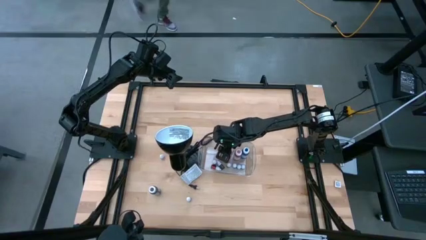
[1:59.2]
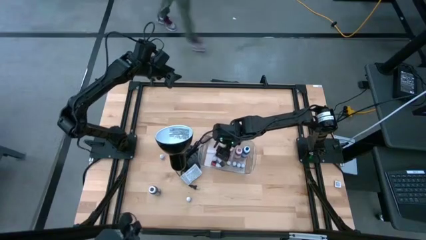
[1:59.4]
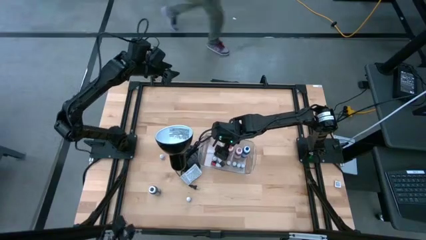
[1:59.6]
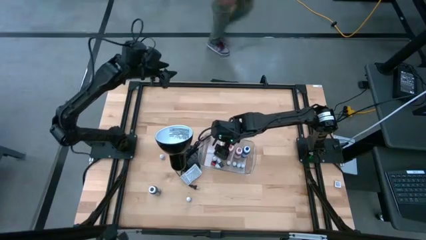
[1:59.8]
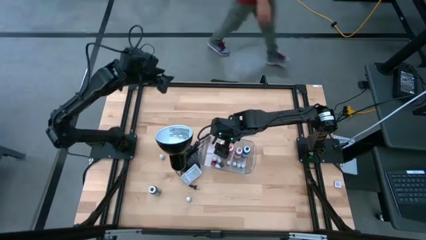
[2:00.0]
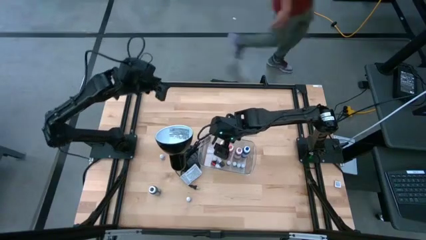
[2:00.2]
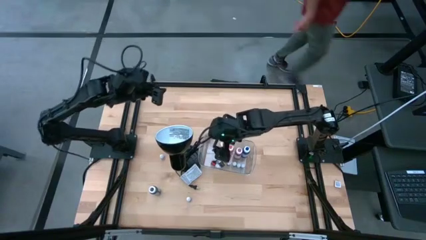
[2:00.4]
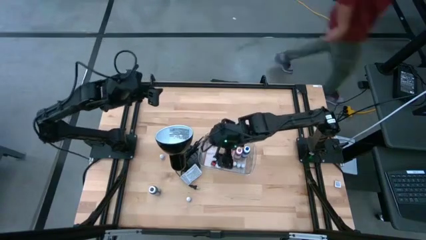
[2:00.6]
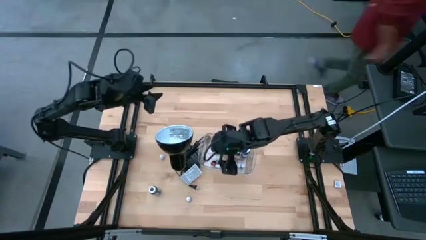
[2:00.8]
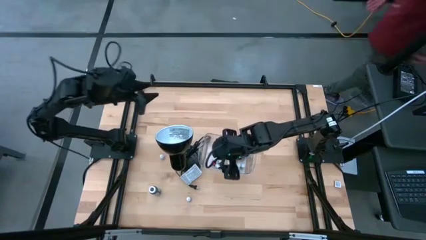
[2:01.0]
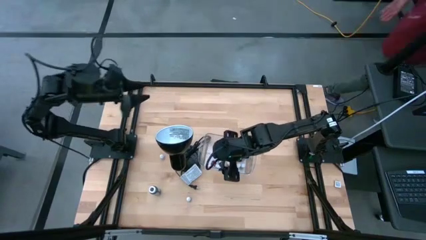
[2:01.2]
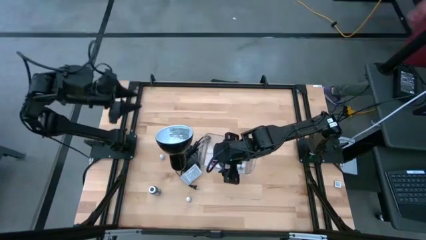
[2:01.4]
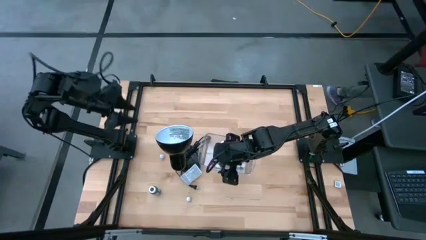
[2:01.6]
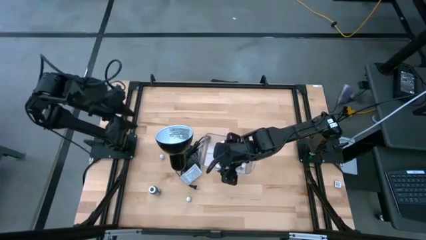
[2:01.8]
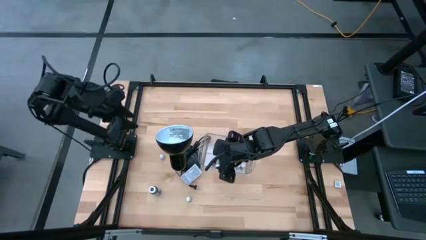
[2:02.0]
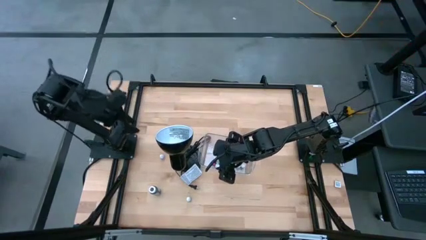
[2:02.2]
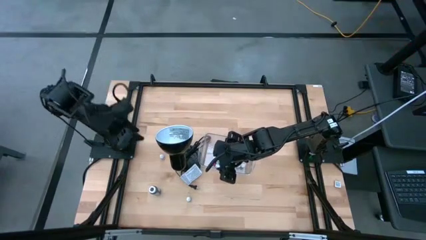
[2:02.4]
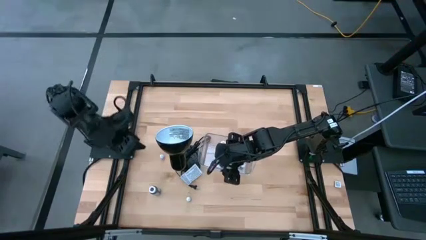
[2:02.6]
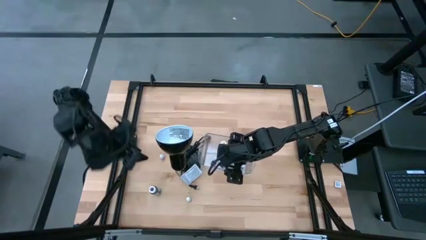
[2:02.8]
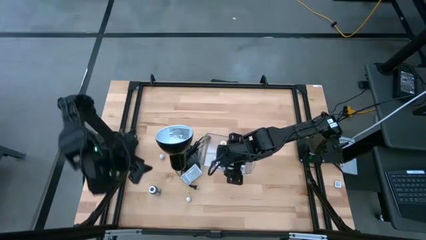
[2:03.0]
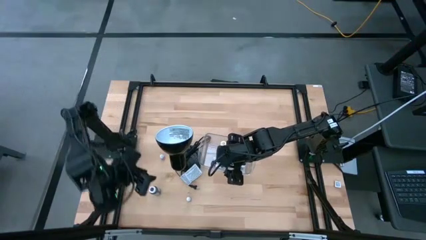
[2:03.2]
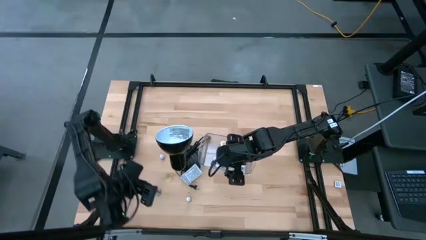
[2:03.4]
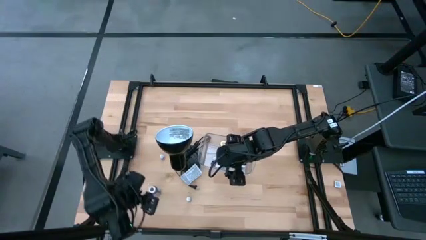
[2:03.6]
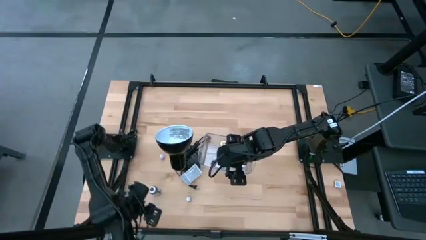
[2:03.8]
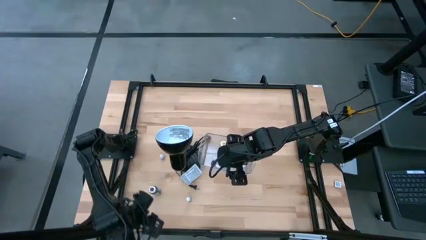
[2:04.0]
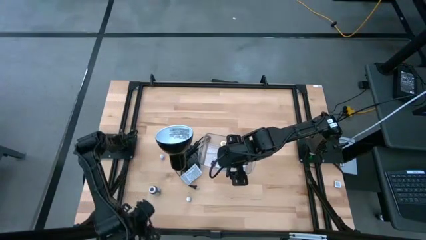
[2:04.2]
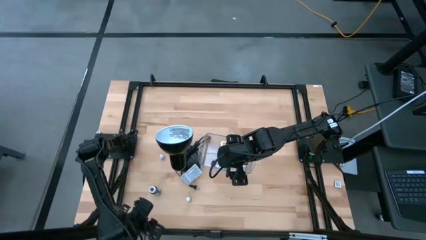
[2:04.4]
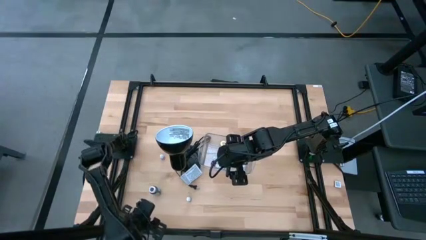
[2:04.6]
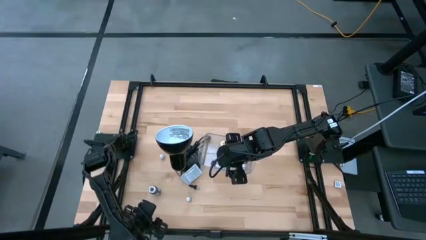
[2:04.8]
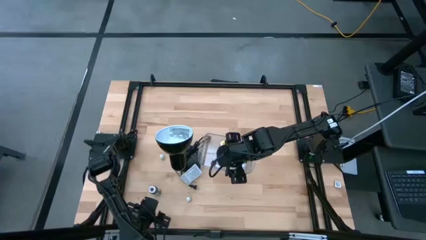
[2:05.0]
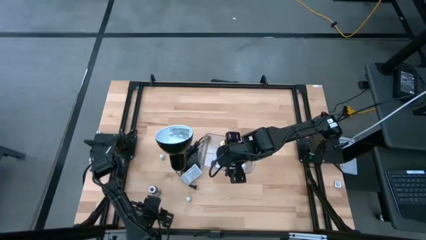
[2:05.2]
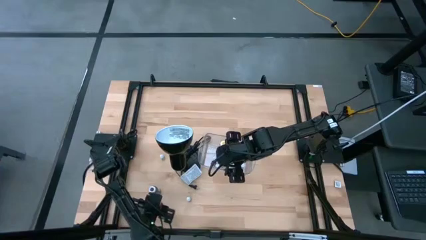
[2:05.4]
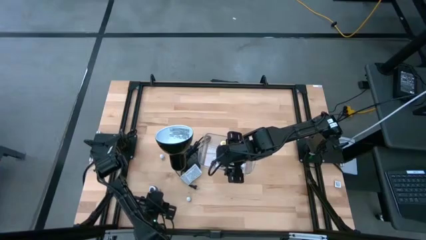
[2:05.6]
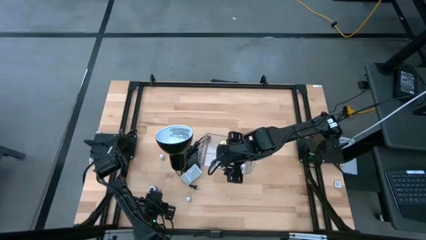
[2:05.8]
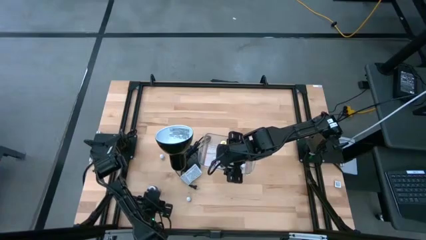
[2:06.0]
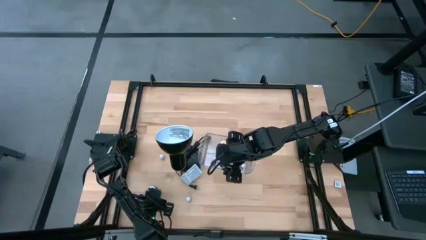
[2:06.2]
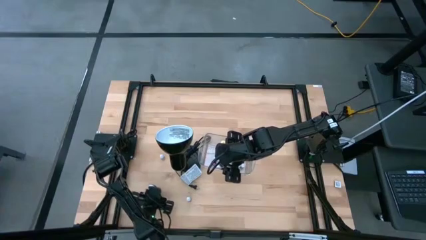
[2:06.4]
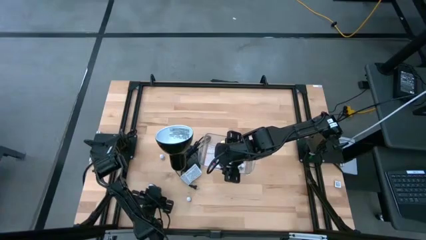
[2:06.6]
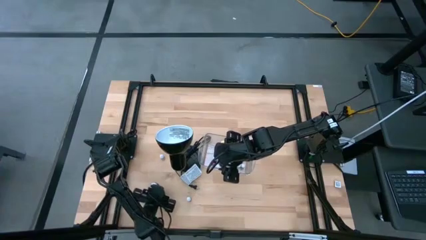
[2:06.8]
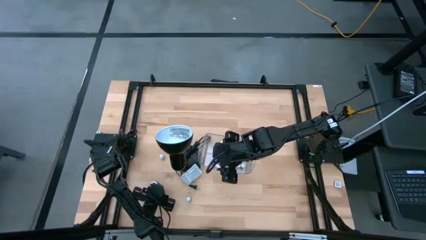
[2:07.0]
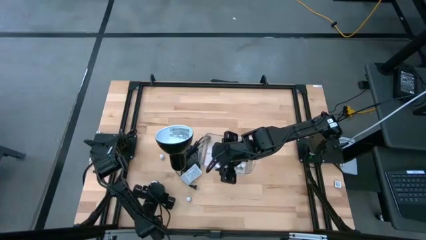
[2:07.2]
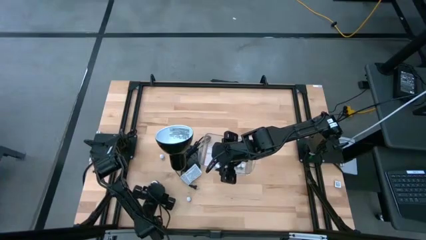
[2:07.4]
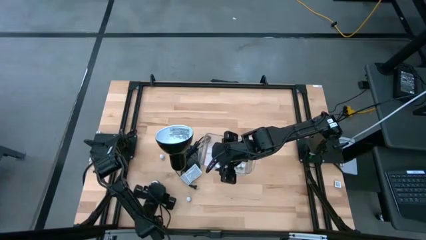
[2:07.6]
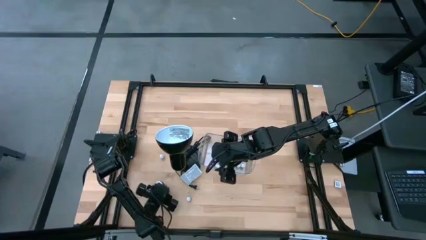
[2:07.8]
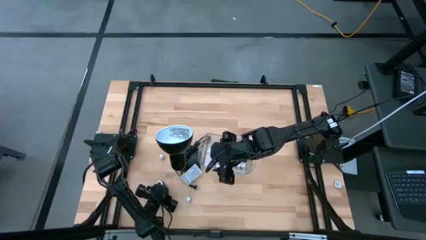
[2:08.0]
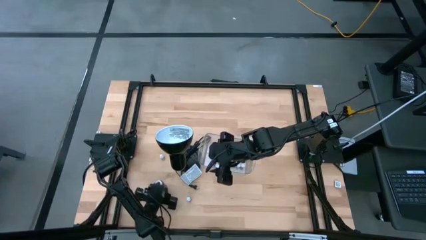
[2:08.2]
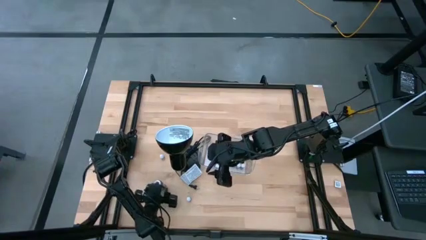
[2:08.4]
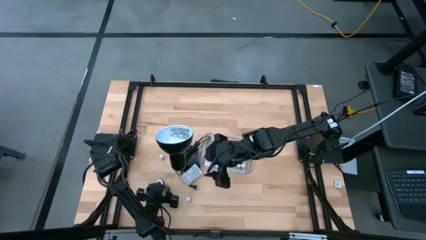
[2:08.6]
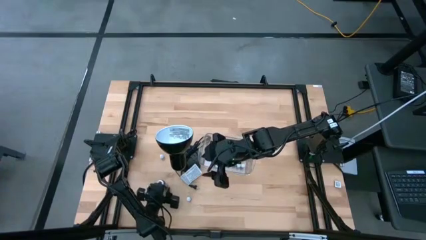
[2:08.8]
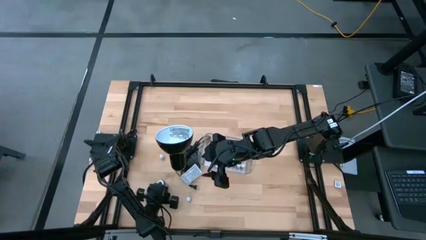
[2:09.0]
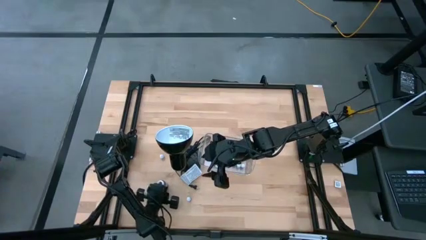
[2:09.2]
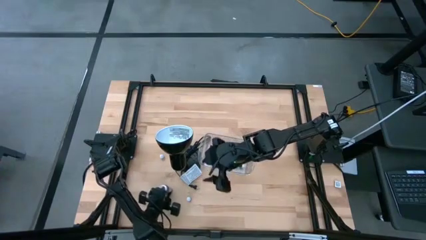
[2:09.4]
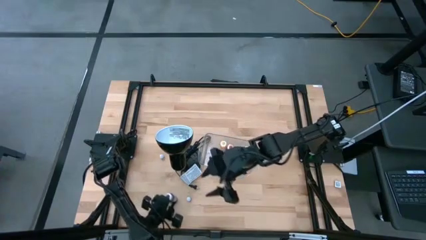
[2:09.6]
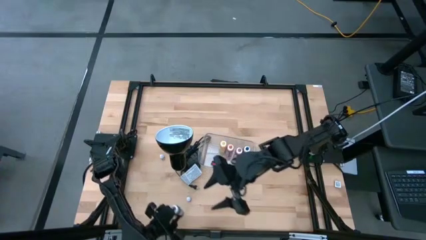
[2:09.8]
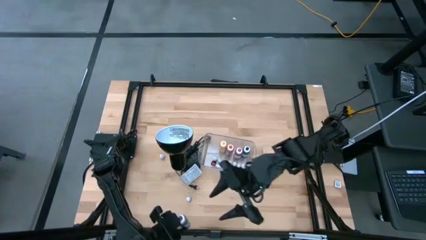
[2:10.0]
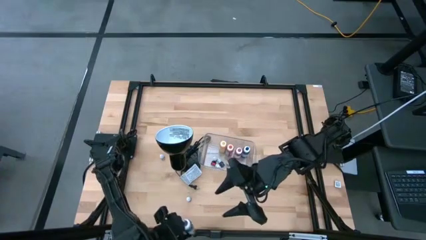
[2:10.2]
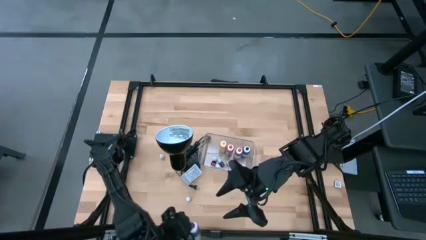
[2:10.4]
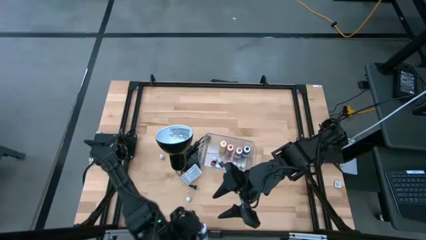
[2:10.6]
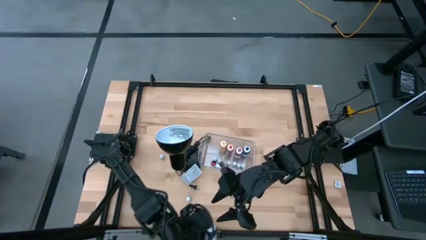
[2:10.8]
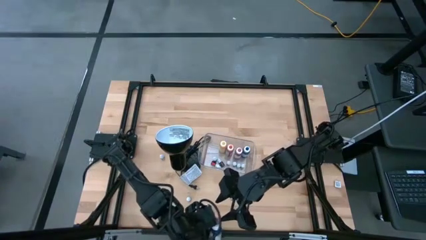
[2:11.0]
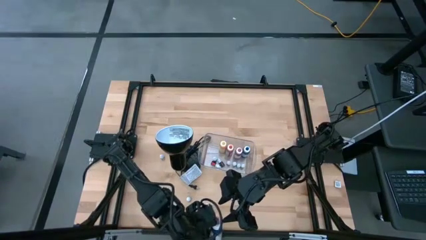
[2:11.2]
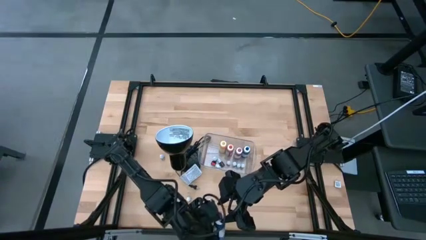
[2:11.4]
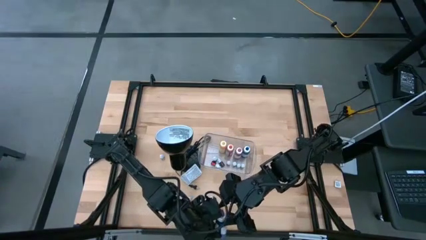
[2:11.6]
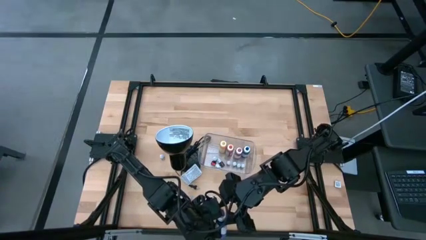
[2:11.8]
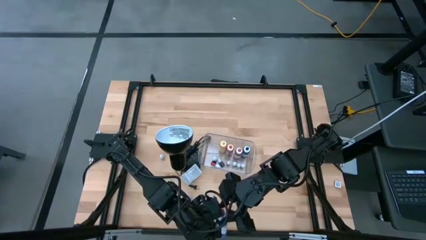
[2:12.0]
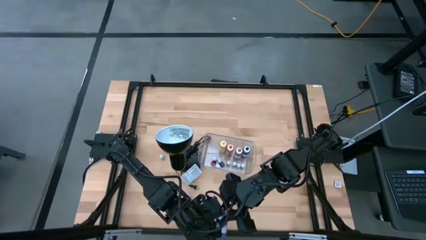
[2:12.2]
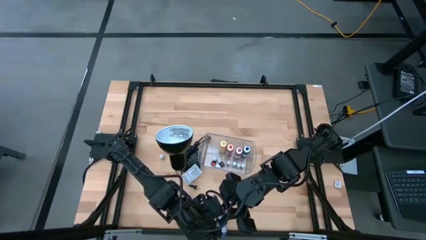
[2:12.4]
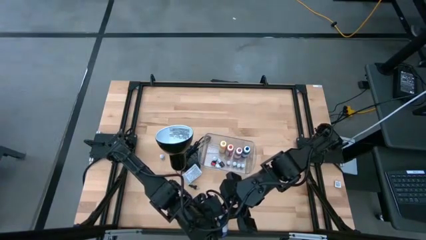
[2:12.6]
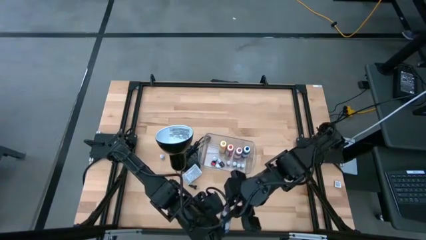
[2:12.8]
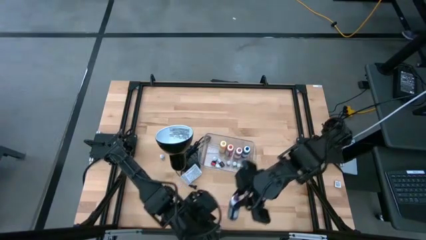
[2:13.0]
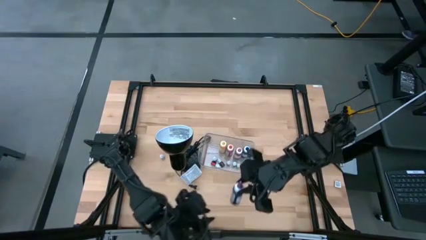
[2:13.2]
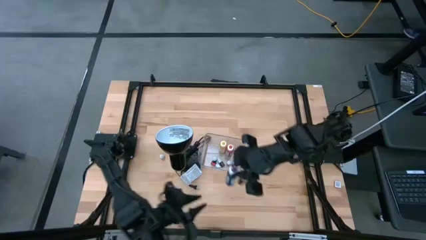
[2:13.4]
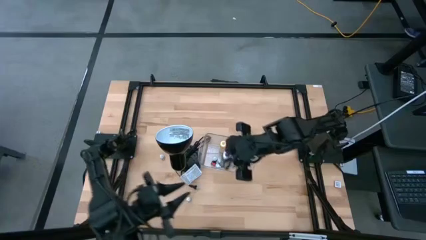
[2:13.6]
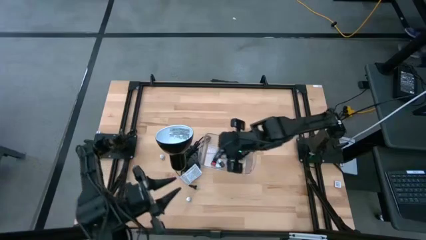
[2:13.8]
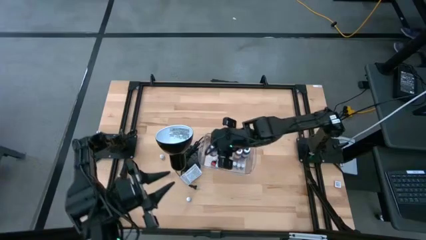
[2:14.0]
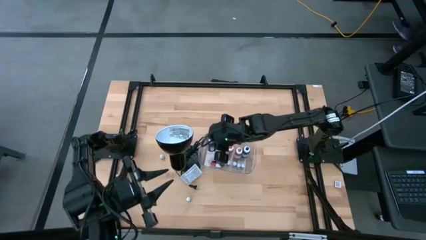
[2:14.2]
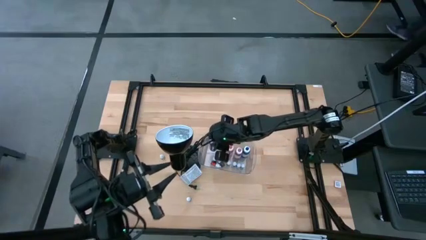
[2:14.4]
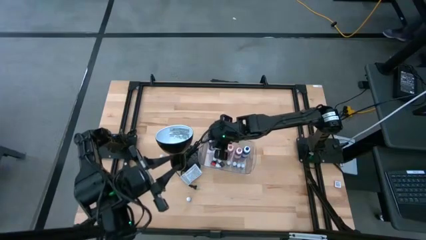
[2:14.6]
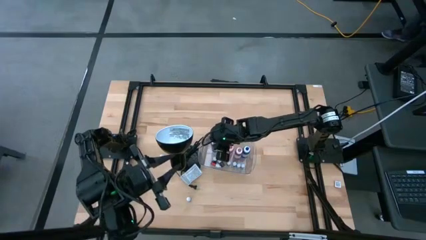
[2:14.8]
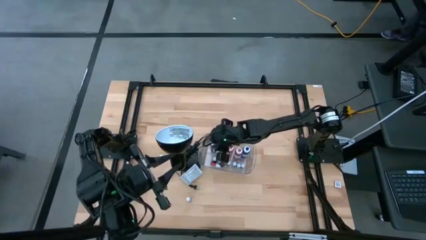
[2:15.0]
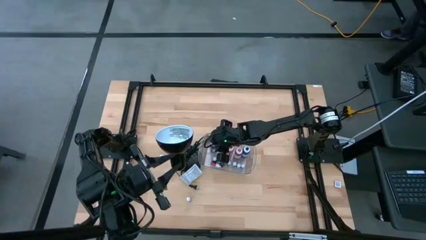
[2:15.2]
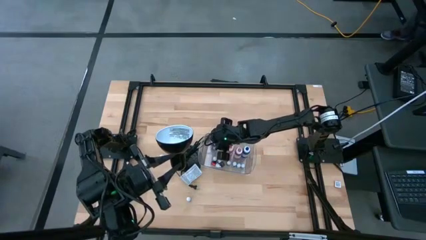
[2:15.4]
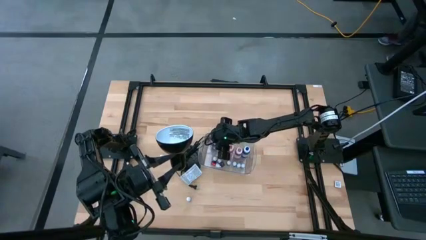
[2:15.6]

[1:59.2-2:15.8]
Task: Pick & Place food coloring
Put the big purple food coloring bottle into the transparent bin
